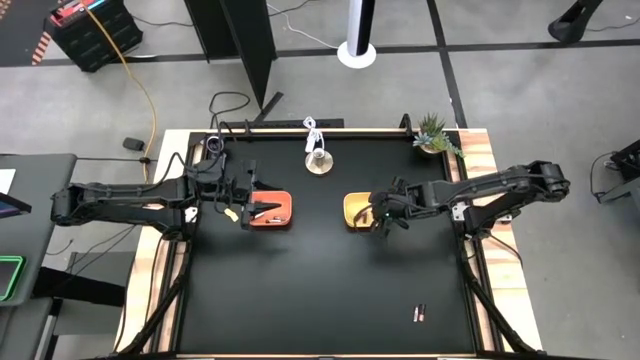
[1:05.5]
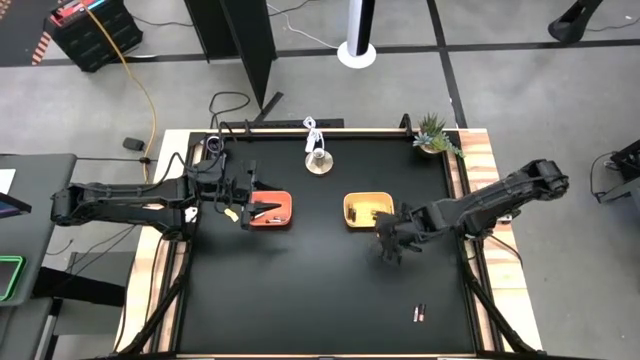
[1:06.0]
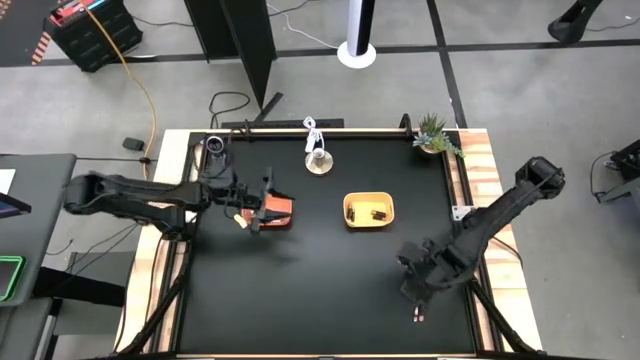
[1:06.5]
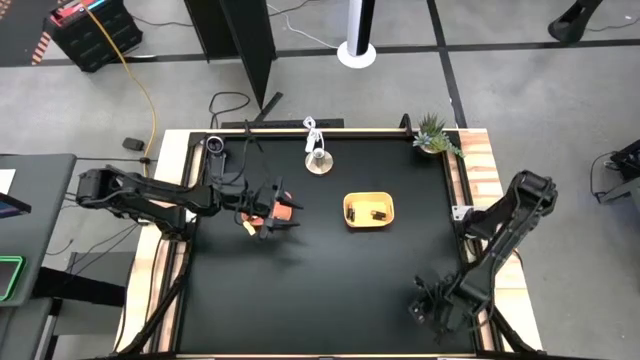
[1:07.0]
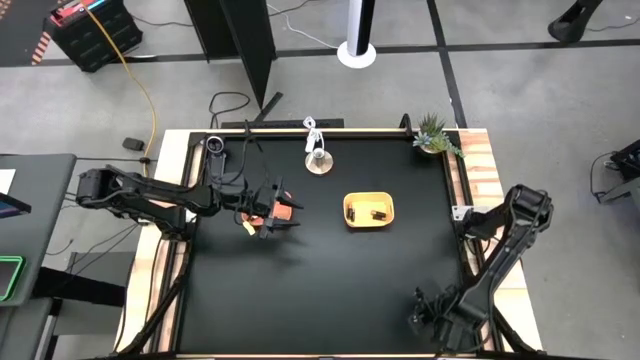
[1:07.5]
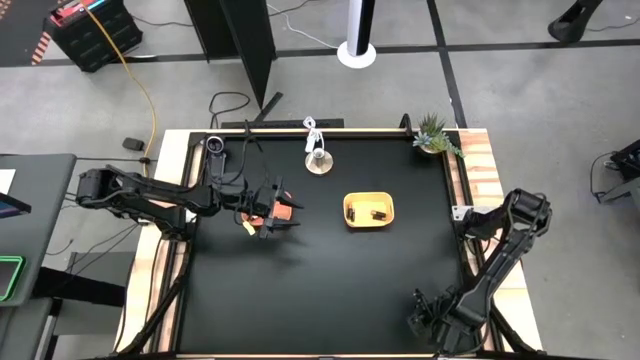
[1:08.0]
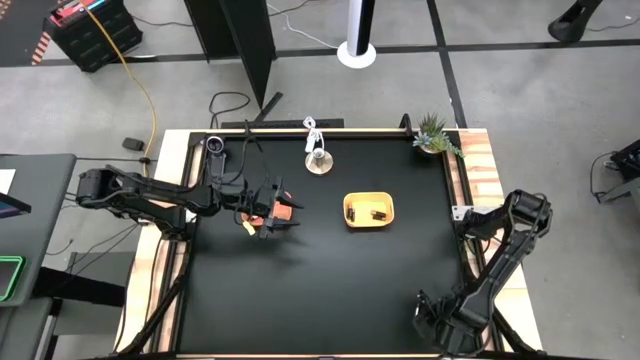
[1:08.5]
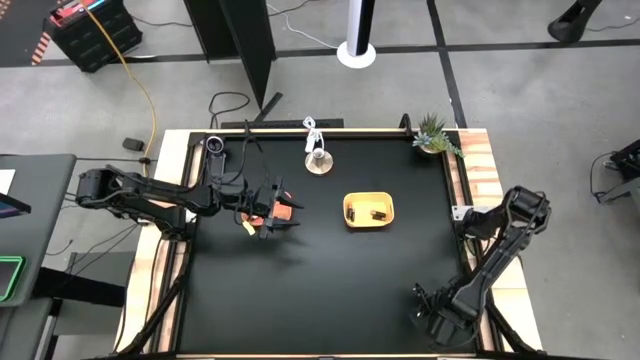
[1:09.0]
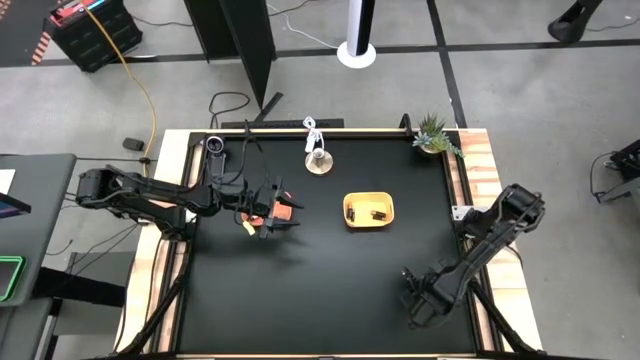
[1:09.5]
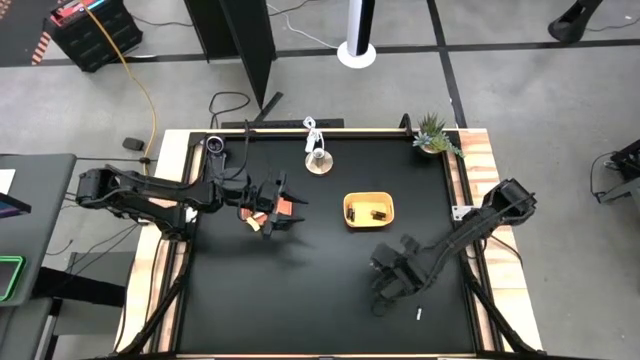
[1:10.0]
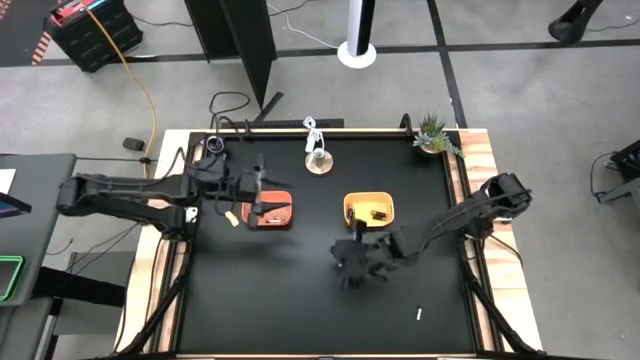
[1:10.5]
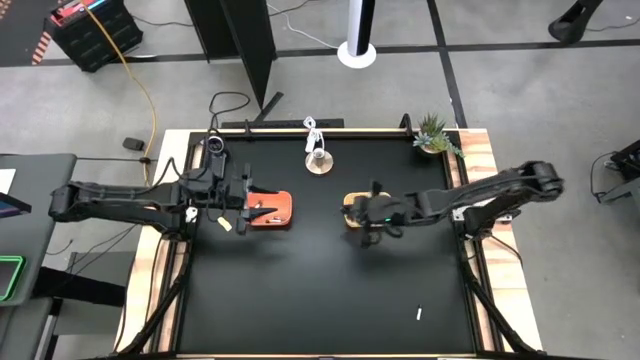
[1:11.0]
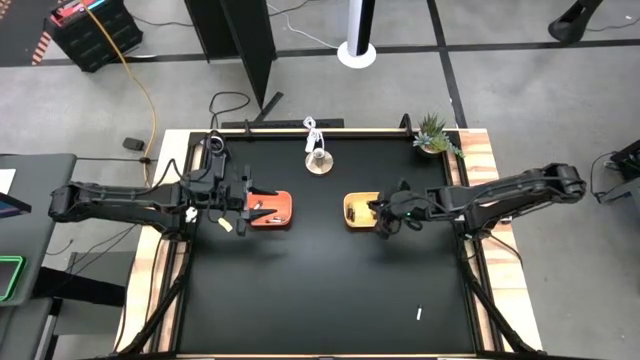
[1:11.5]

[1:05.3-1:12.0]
Task: Sort batteries
Put the black battery into the yellow bin

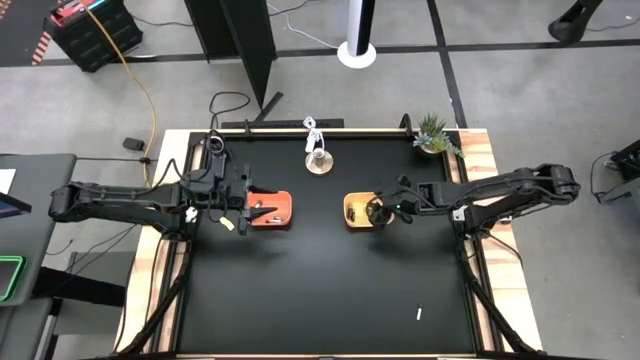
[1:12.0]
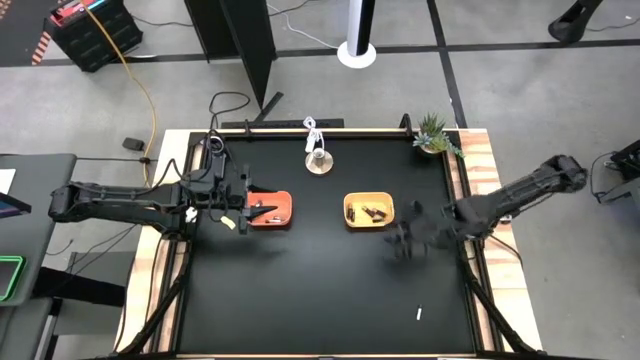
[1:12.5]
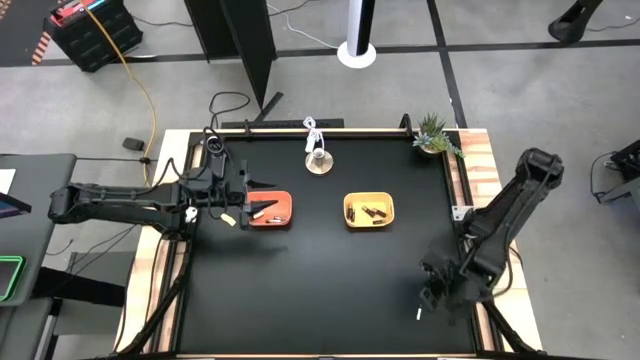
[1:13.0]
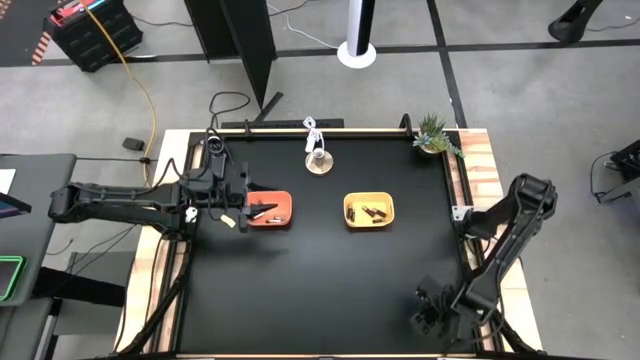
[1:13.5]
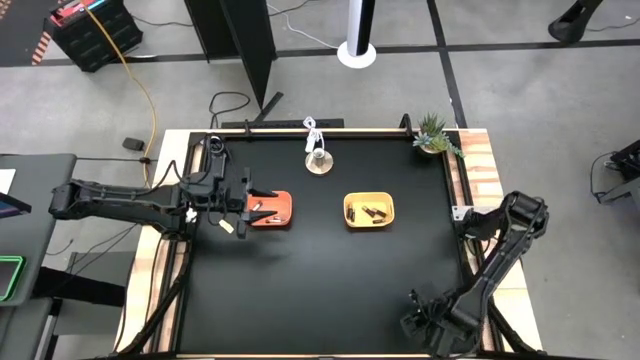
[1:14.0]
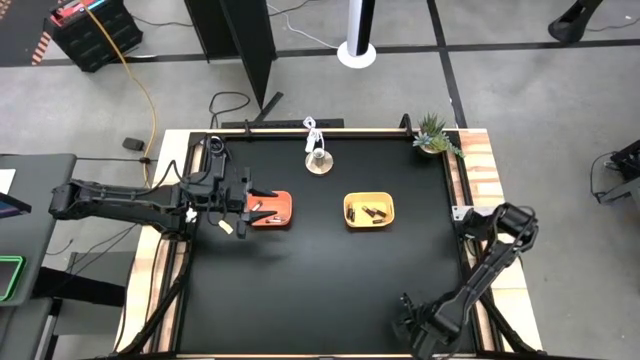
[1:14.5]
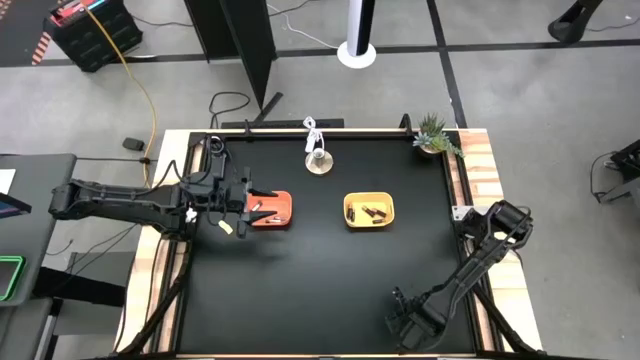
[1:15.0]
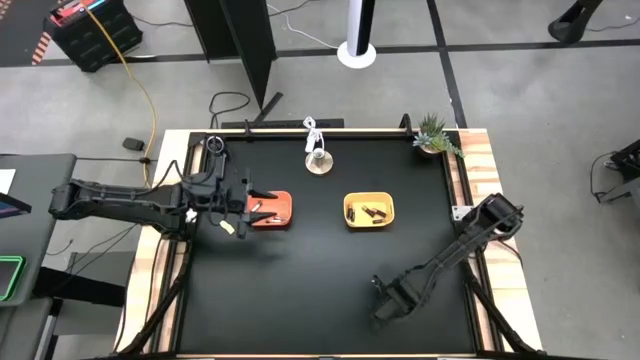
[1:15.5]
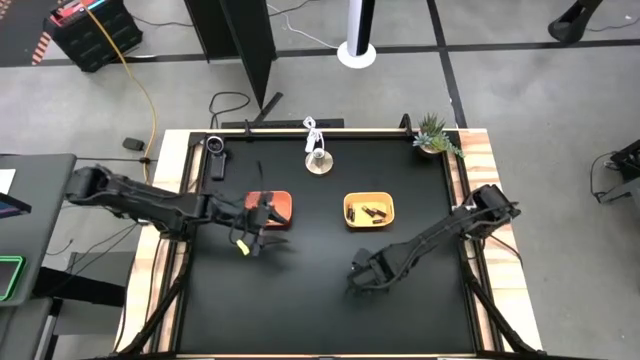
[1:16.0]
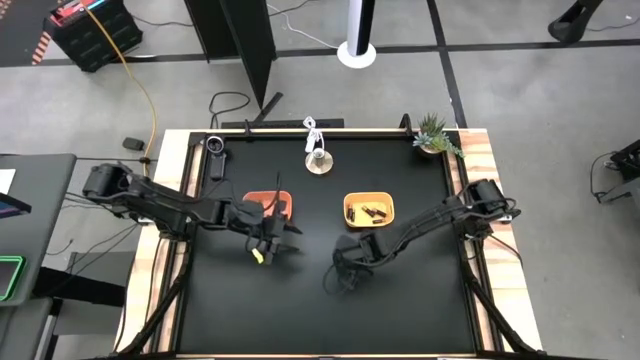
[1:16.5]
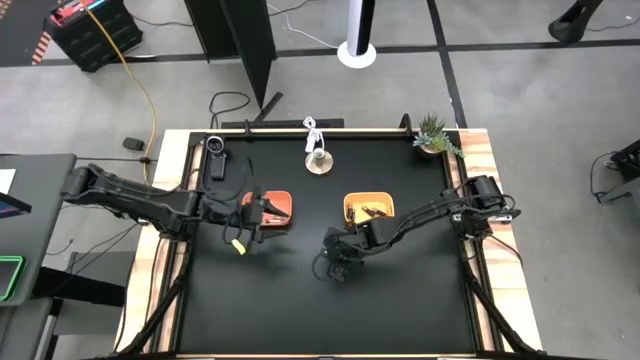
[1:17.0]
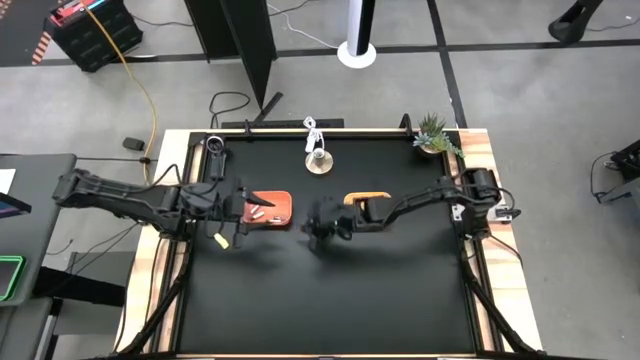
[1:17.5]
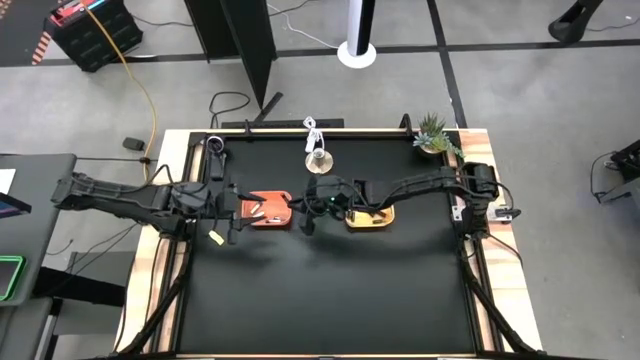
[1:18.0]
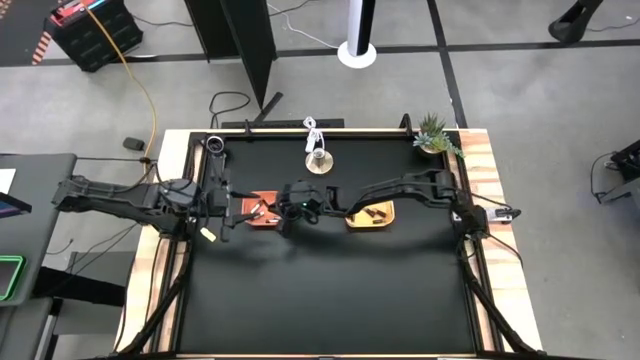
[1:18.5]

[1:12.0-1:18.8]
Put the silver battery into the orange bin

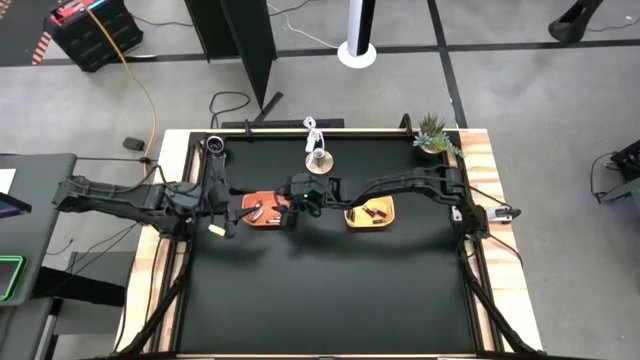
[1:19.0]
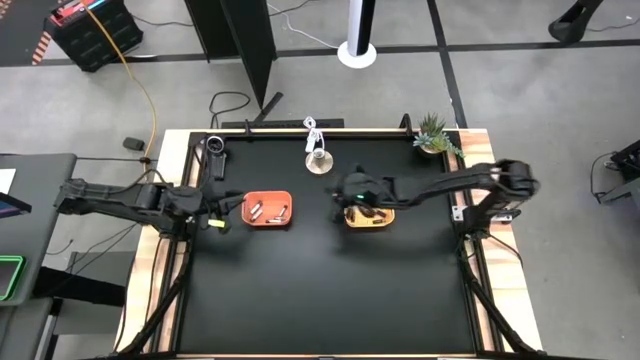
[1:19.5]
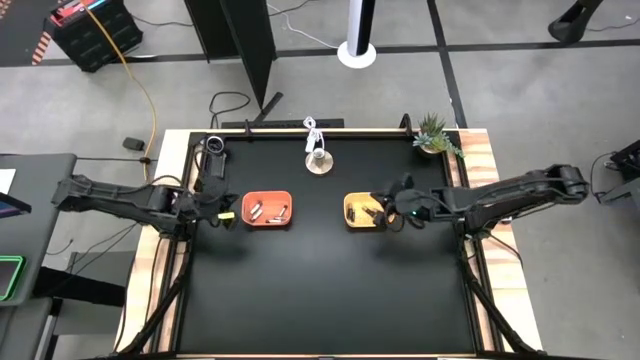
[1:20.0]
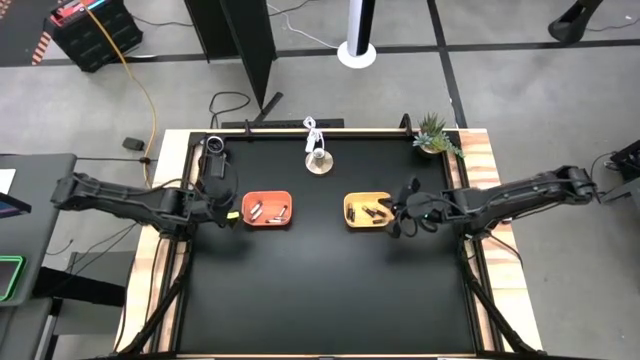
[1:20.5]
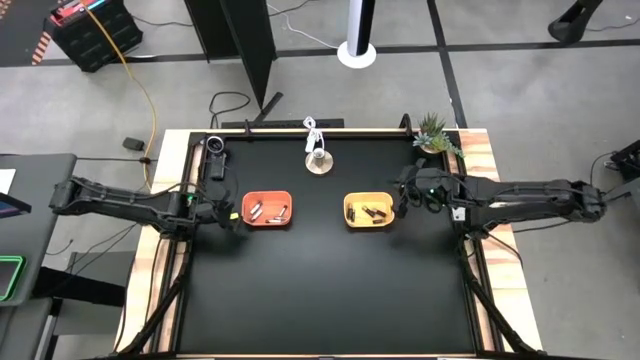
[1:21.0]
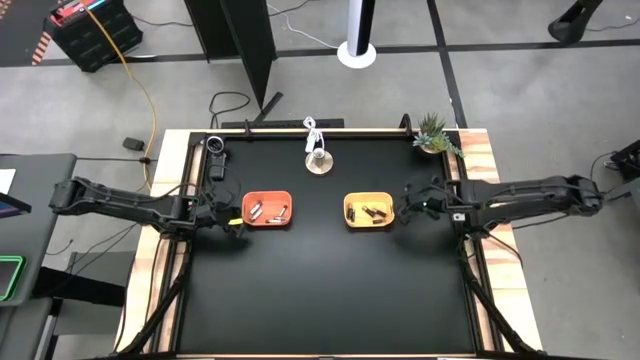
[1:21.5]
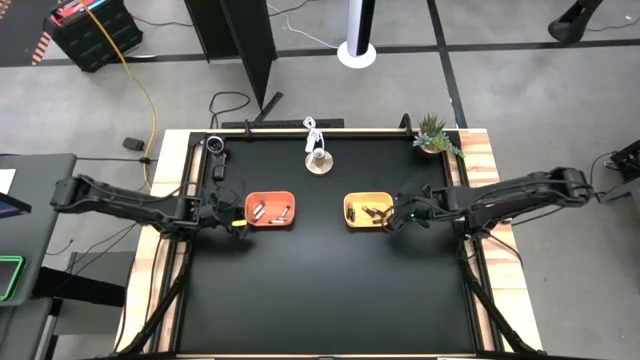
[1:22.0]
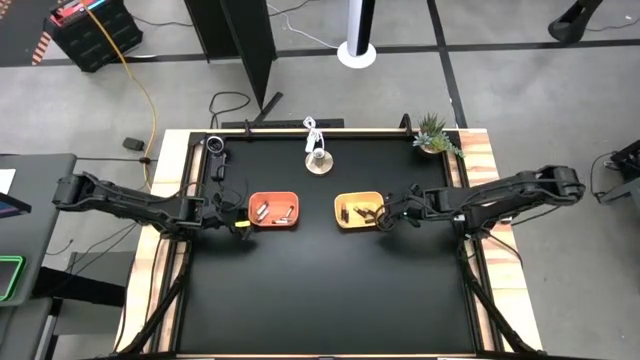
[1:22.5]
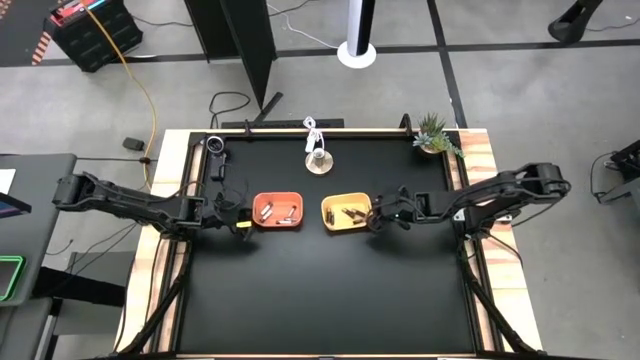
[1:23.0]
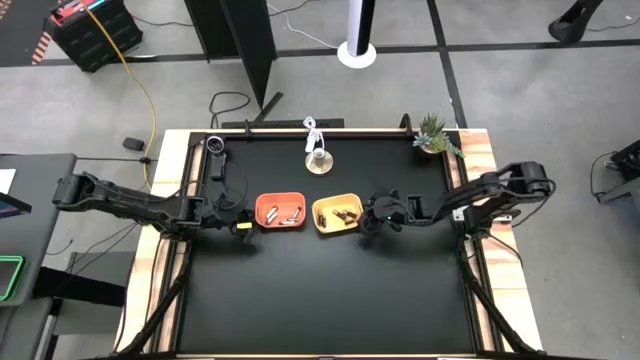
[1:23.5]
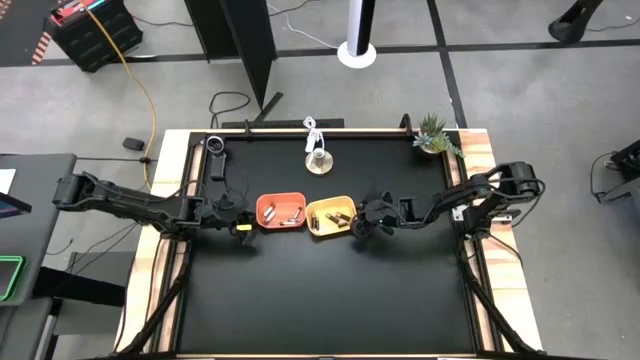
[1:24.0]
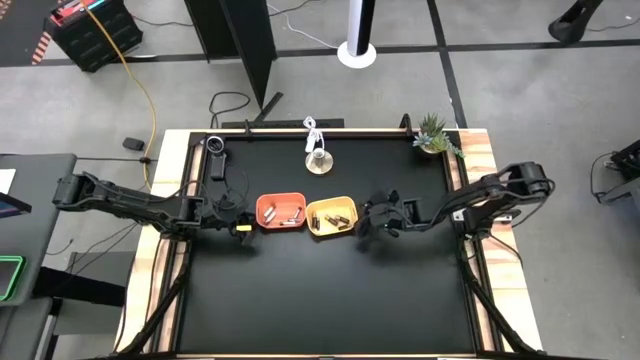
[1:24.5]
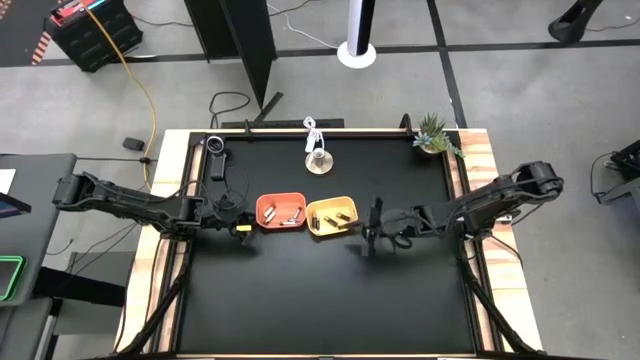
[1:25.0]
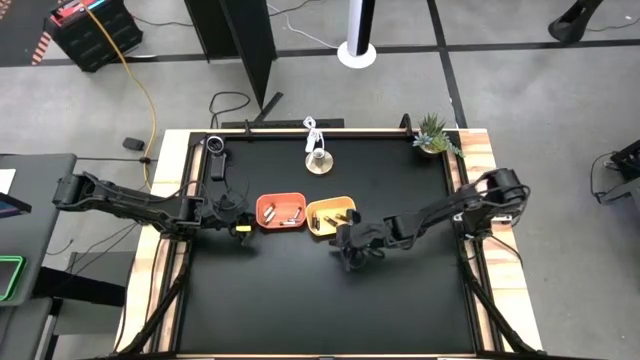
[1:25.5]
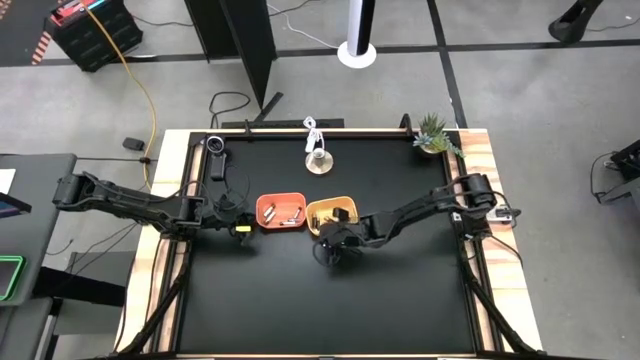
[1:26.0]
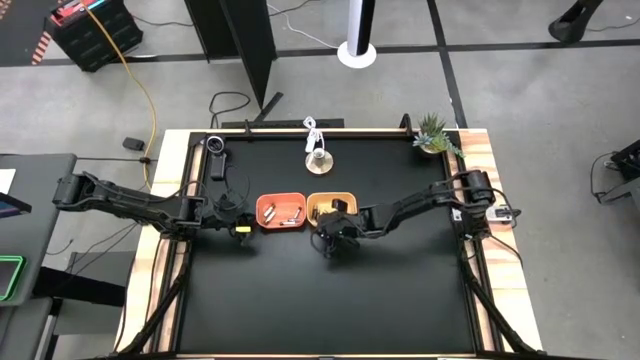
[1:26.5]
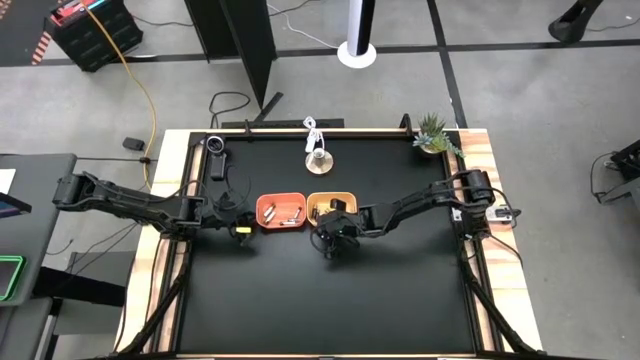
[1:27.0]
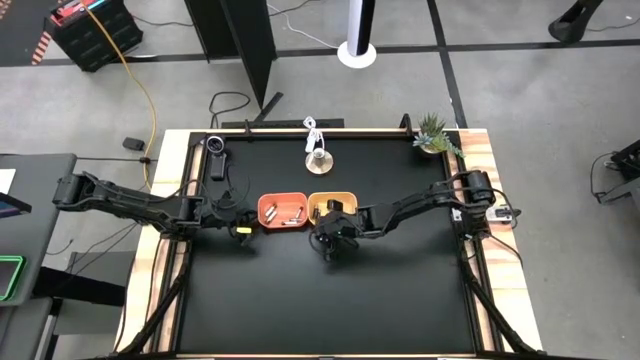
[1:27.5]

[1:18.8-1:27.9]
Adjust the bins
